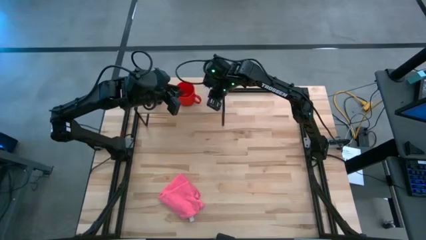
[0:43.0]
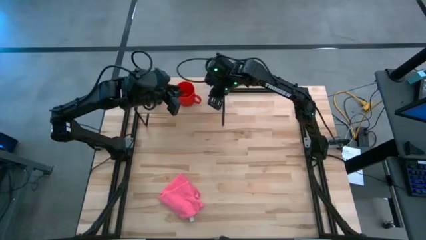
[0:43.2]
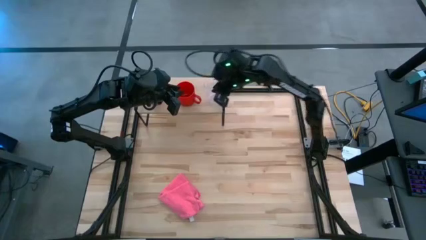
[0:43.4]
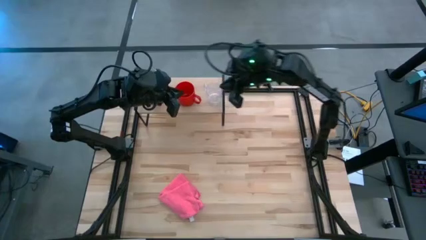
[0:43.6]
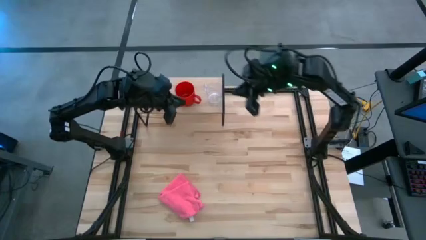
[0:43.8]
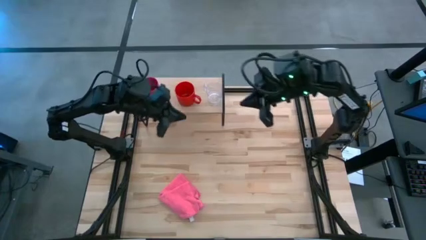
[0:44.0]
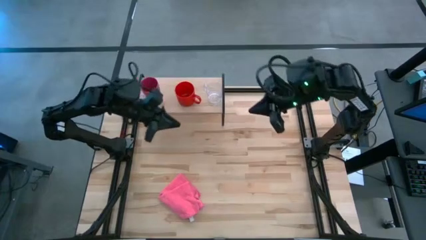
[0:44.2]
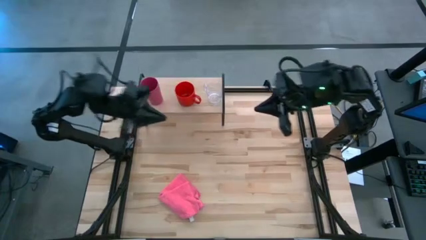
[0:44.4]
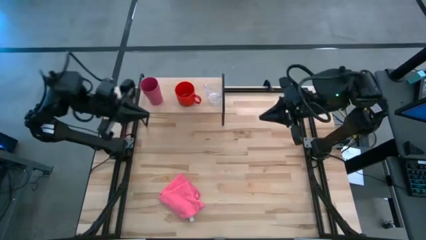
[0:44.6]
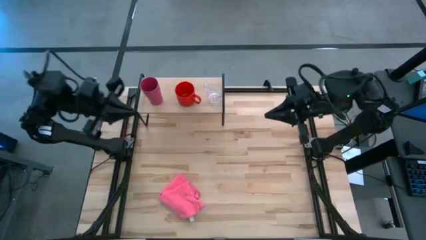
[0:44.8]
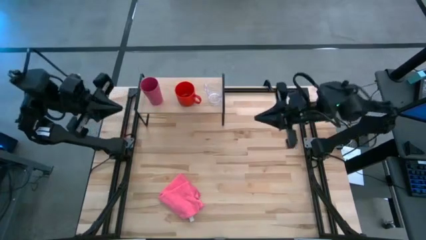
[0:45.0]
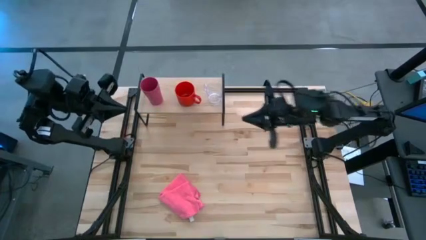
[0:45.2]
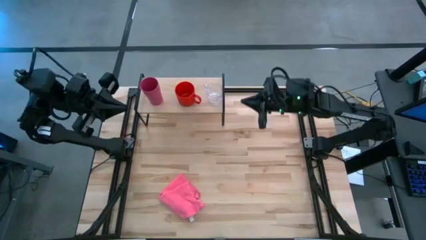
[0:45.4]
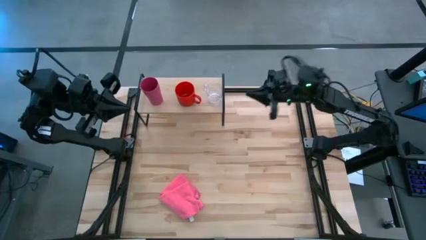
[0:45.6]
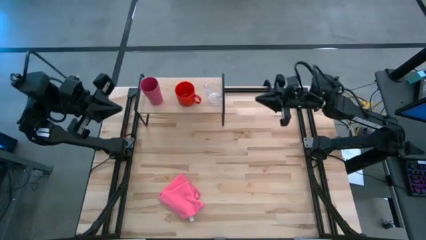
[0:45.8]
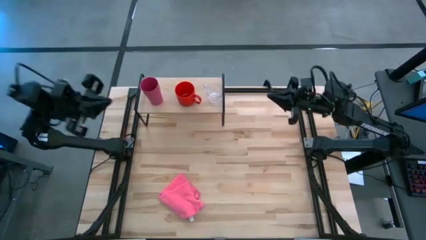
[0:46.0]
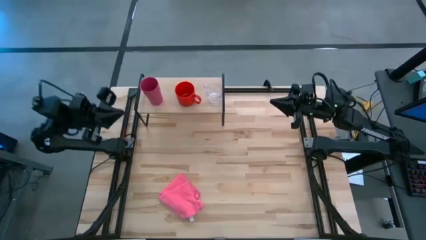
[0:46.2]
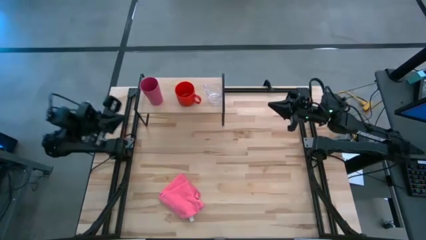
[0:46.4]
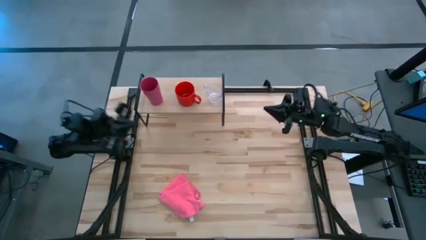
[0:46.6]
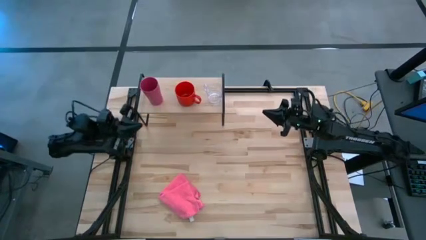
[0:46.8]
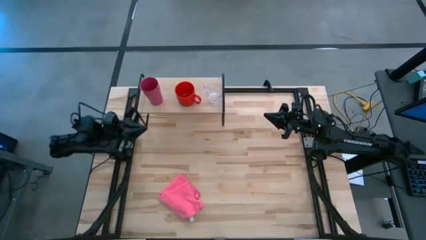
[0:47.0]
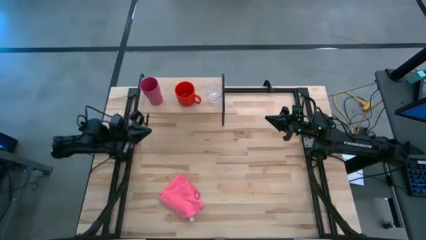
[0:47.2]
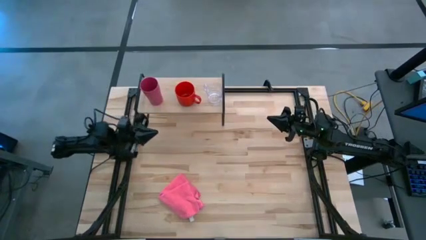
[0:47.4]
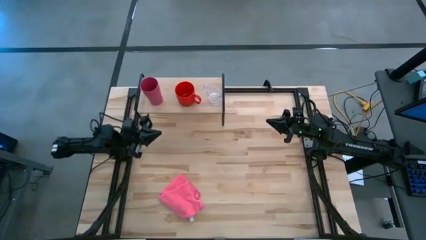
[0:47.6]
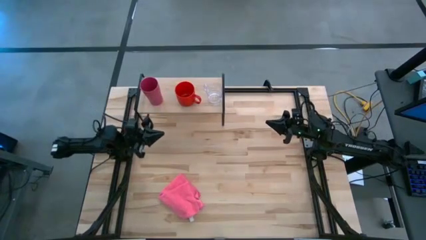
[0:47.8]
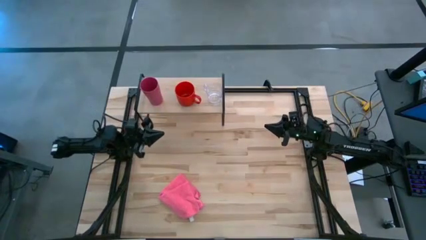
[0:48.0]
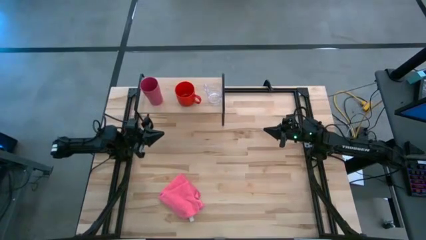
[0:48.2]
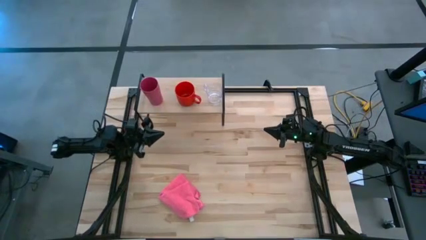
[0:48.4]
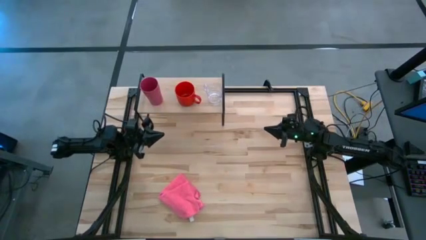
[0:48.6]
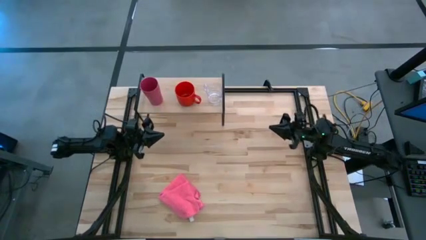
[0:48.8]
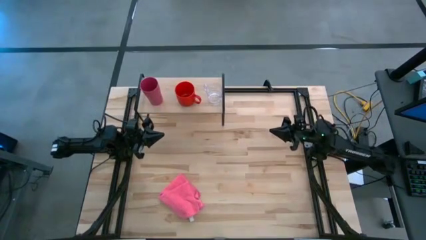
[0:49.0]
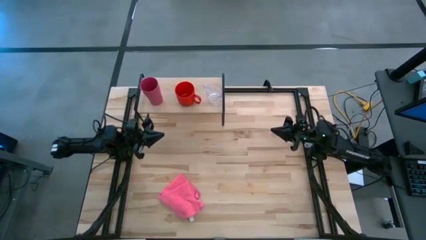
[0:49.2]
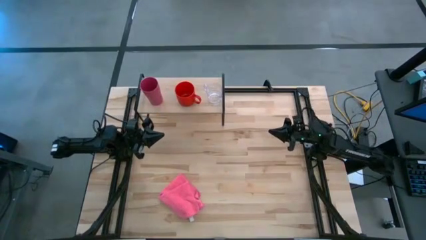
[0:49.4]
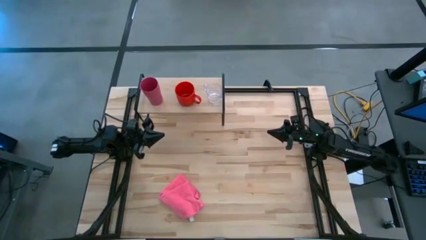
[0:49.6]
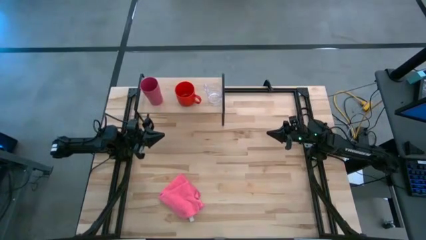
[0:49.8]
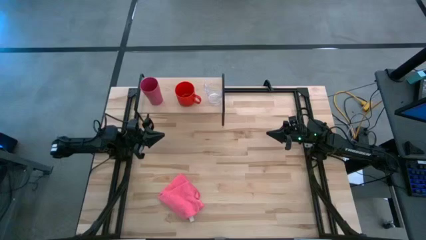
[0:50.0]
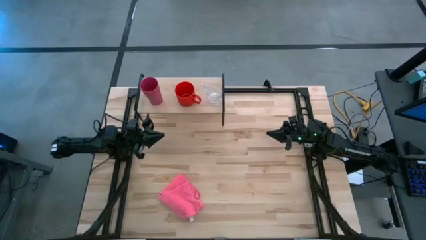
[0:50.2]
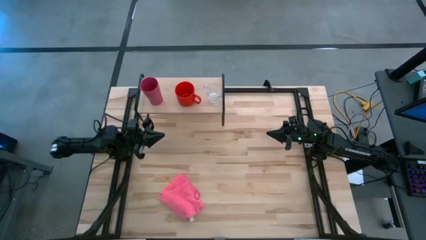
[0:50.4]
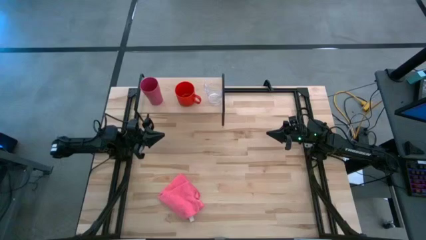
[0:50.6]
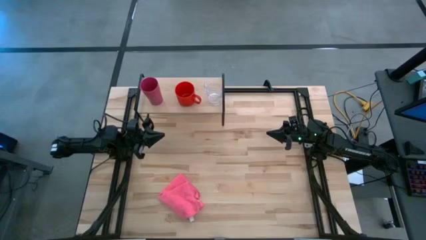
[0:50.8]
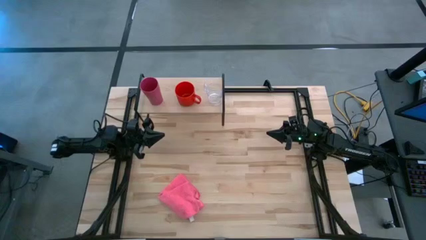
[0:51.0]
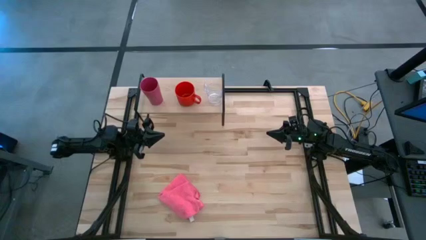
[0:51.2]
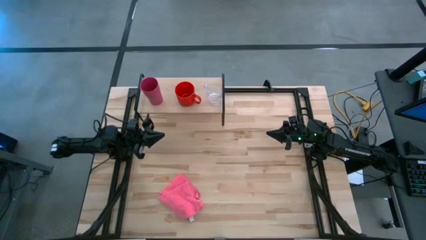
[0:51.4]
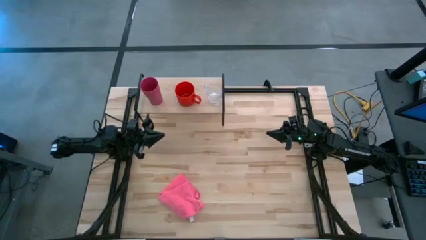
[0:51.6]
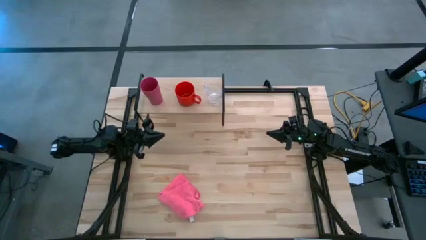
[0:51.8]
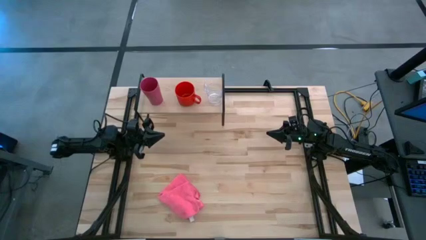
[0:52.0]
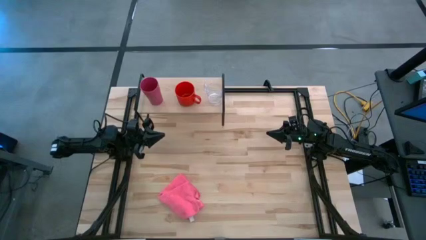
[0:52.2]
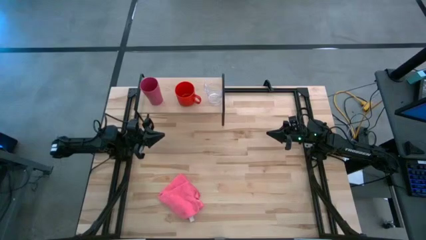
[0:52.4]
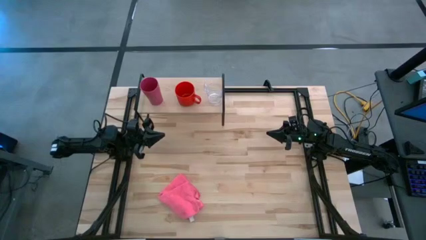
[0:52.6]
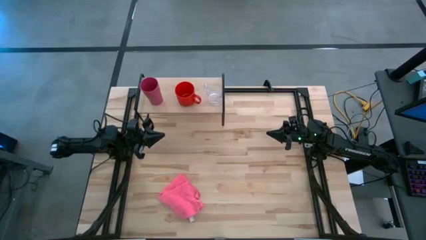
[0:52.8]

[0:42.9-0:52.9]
Task: Stack small to large cups/mugs on shelf
Return to Home Position

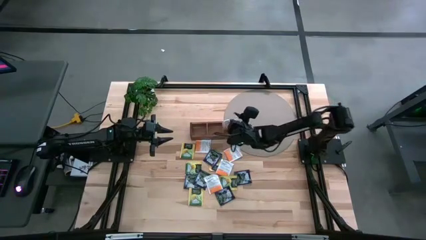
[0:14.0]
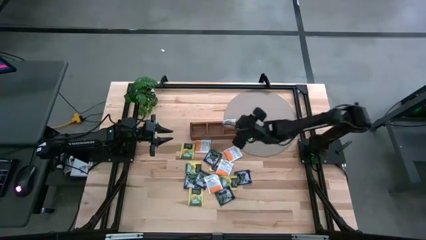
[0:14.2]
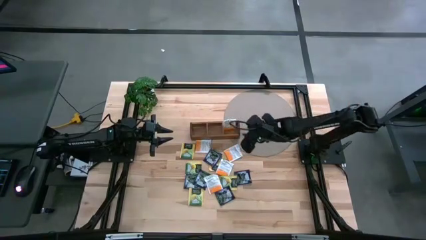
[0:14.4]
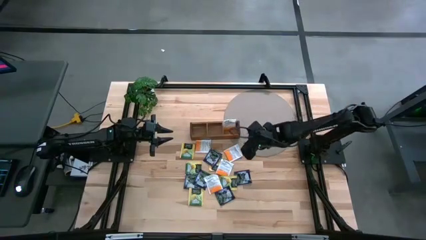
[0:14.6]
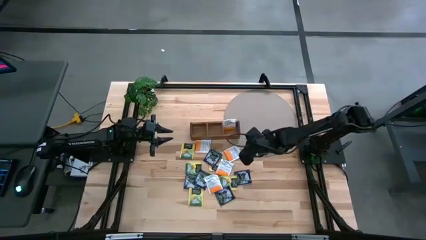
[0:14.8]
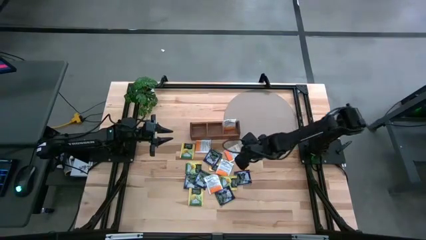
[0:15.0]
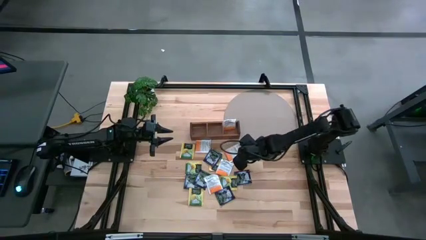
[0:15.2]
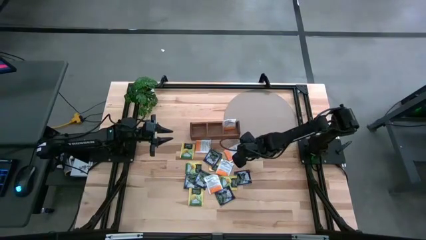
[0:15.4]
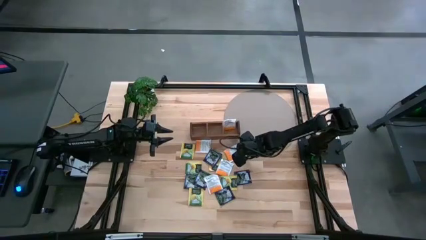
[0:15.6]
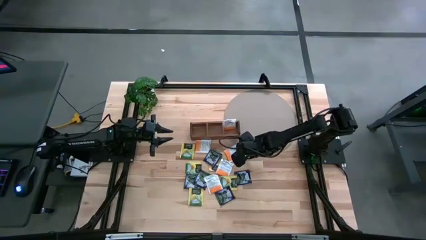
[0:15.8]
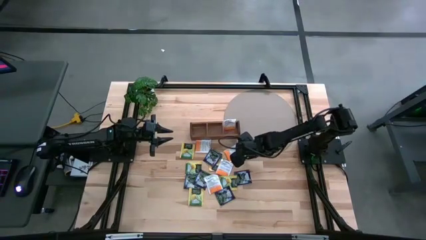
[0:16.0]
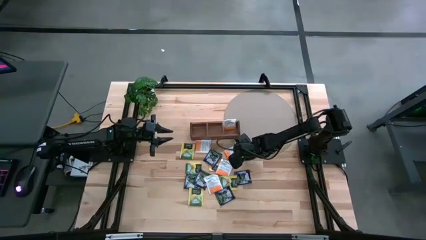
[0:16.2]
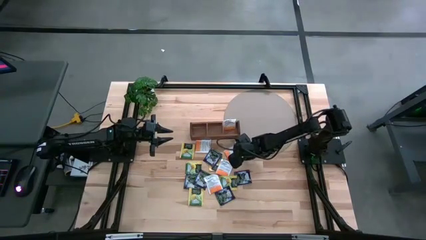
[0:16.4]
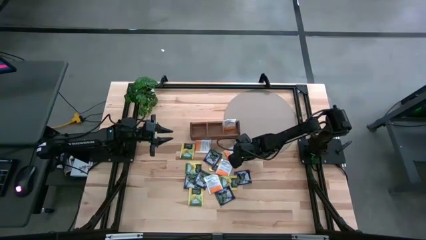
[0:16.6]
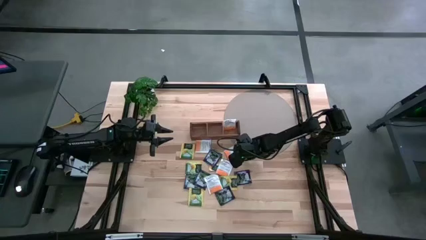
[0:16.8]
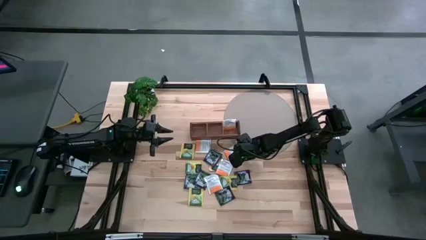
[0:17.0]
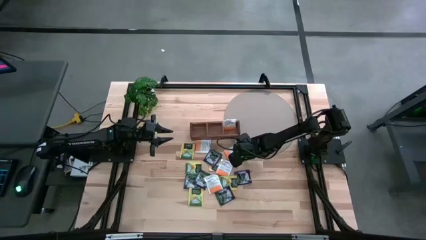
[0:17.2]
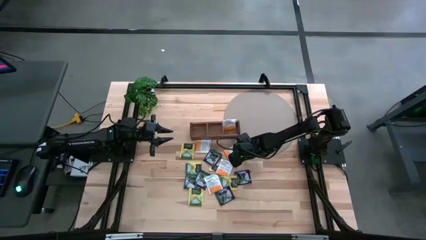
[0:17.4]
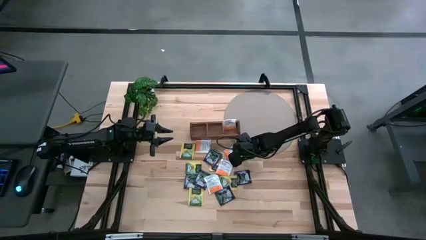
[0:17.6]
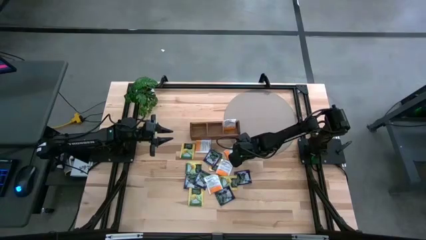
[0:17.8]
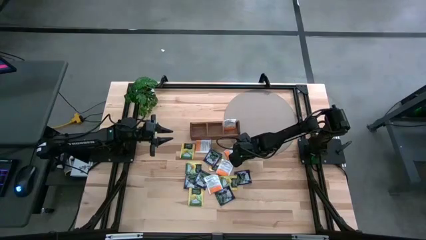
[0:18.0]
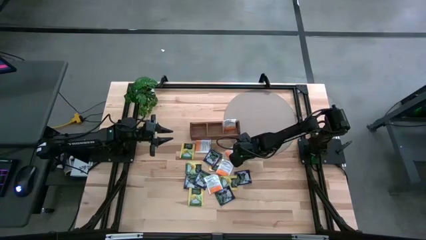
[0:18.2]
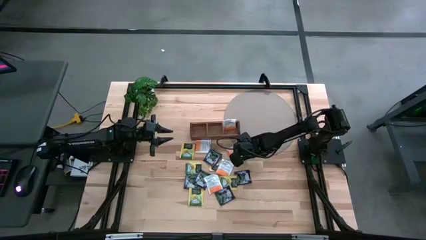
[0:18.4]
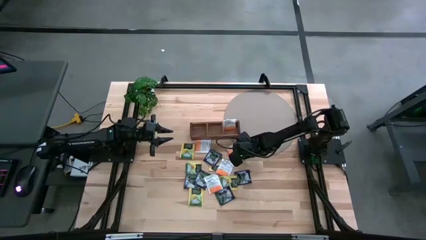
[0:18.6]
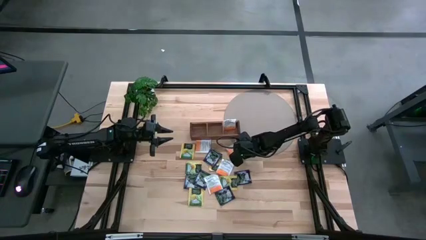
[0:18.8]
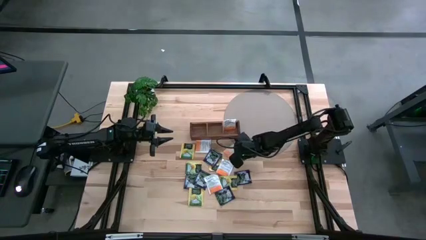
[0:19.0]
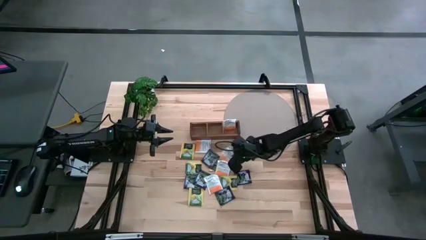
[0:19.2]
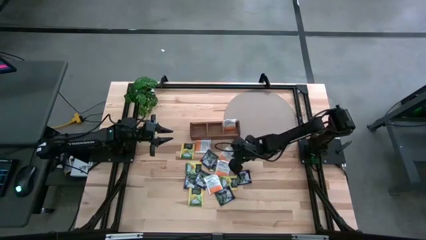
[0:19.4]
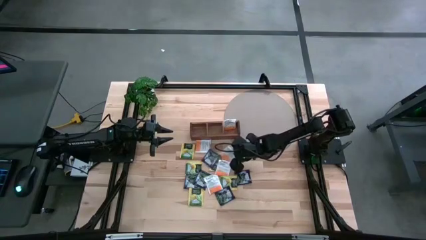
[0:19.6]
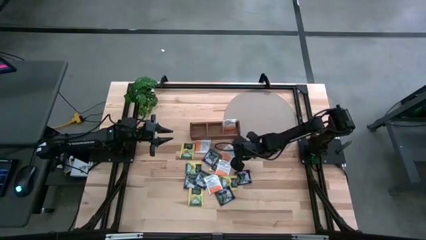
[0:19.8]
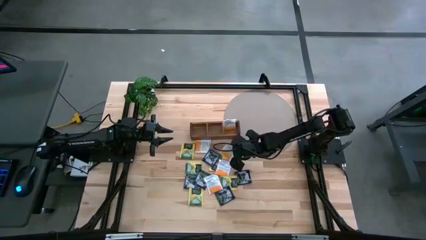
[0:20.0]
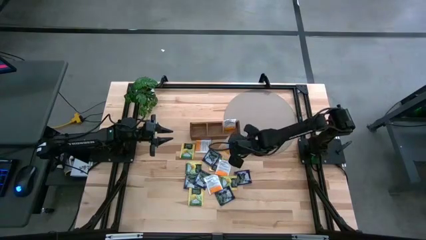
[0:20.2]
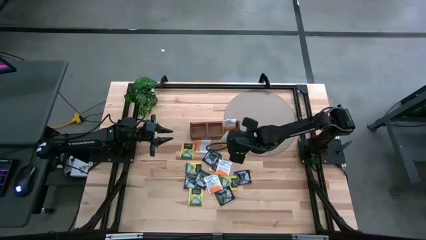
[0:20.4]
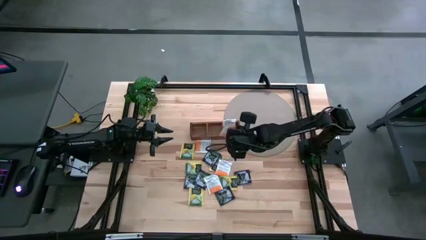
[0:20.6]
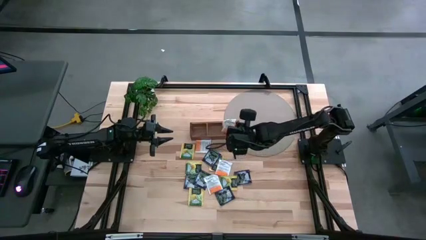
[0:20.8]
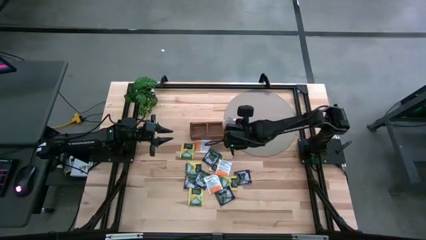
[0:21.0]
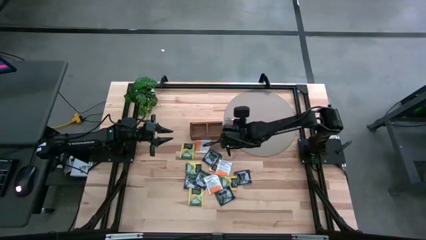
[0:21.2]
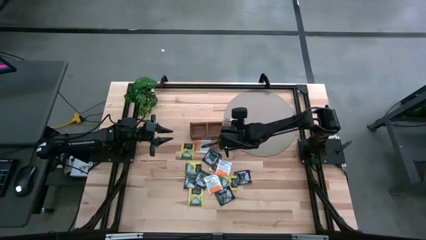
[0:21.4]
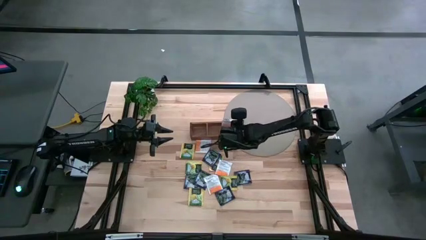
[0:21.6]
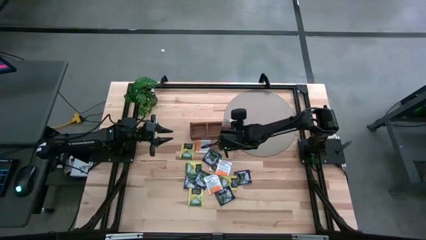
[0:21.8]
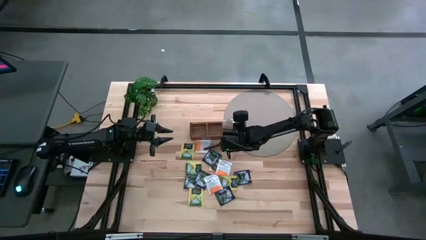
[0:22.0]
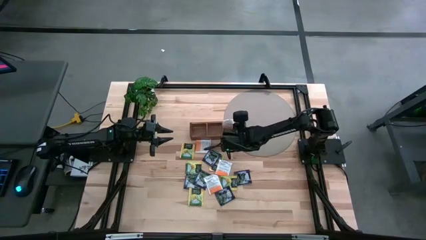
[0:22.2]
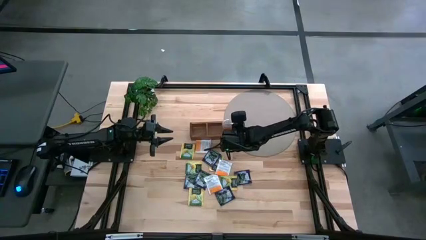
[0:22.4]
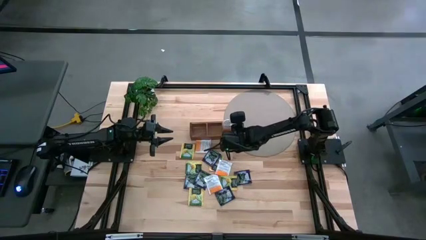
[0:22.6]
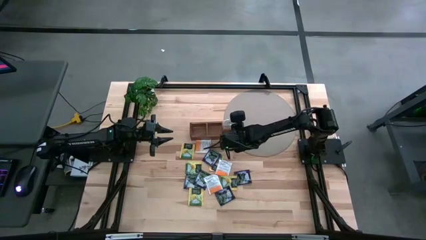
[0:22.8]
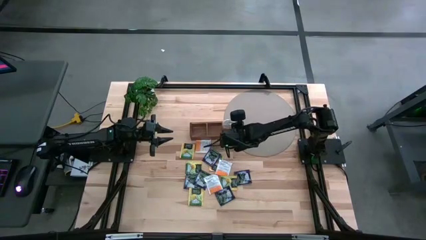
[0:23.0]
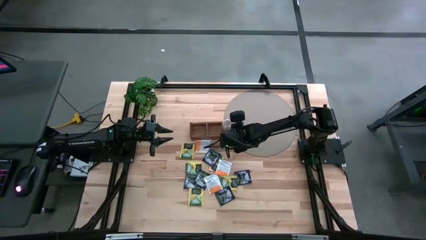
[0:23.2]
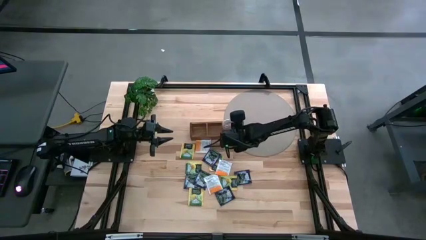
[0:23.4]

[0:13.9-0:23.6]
Task: Pick & Place Tea
Put the white tea bag into the right section of the wooden organizer
